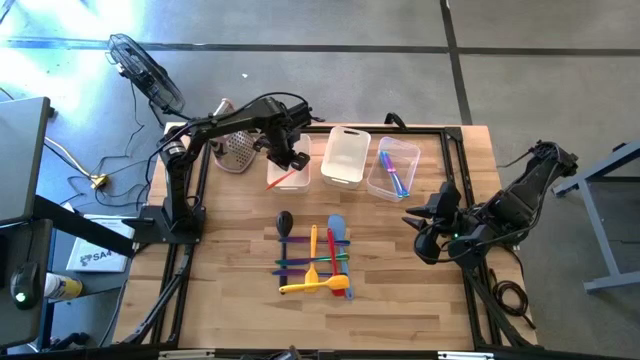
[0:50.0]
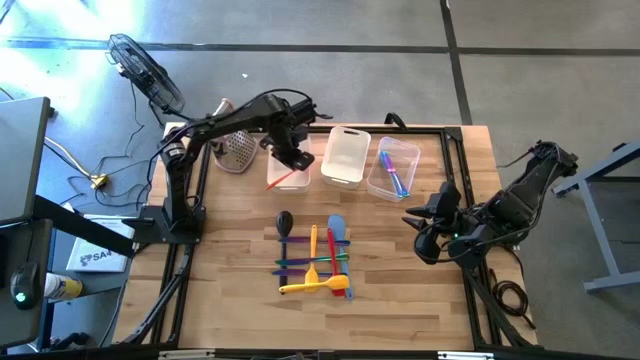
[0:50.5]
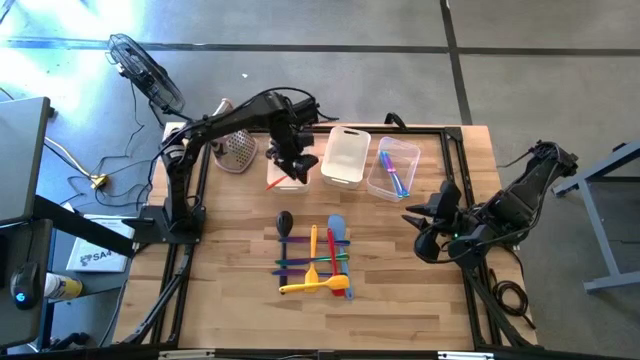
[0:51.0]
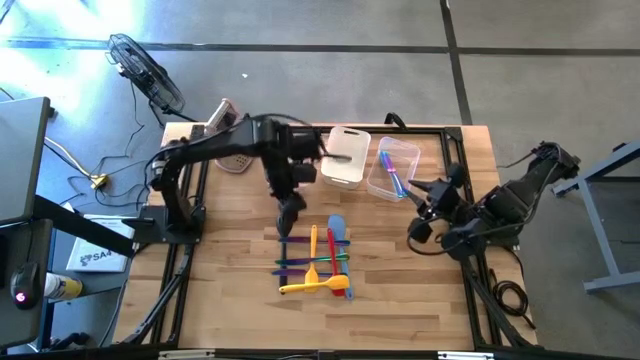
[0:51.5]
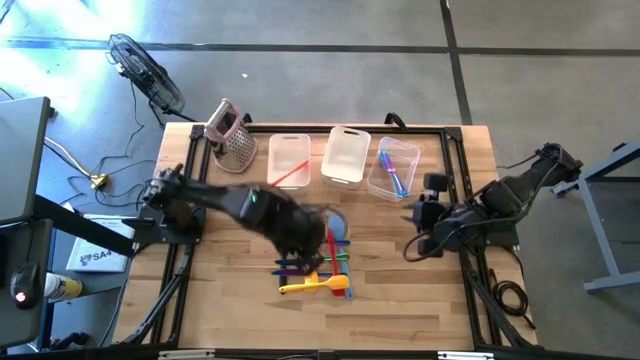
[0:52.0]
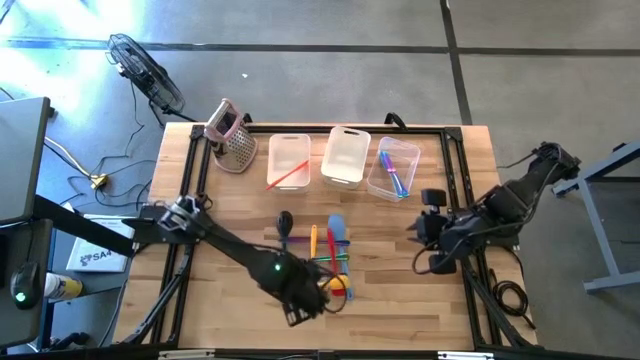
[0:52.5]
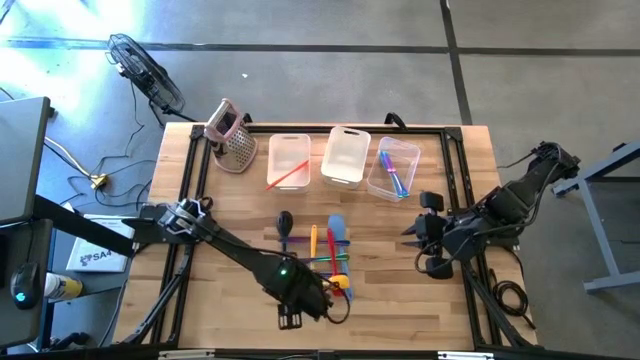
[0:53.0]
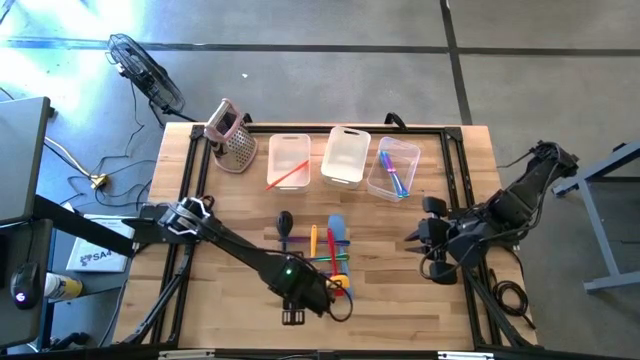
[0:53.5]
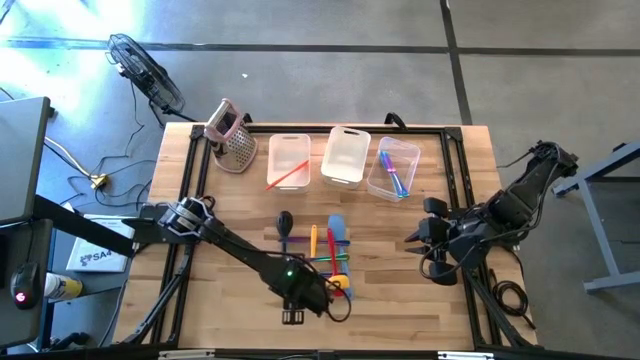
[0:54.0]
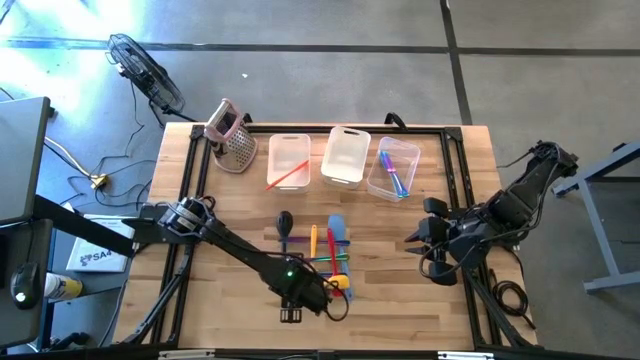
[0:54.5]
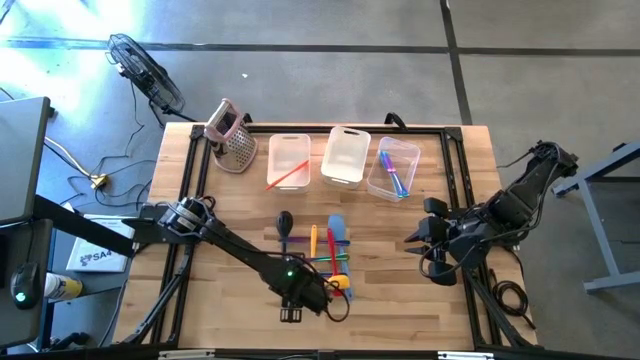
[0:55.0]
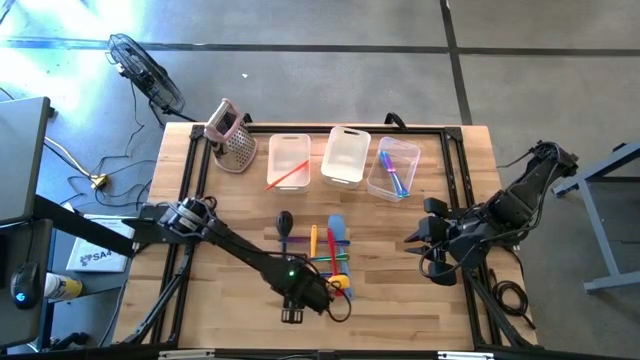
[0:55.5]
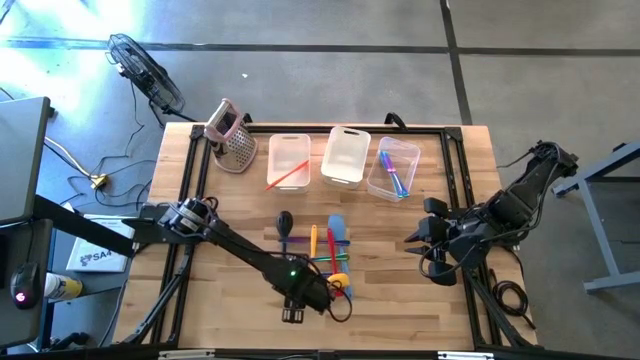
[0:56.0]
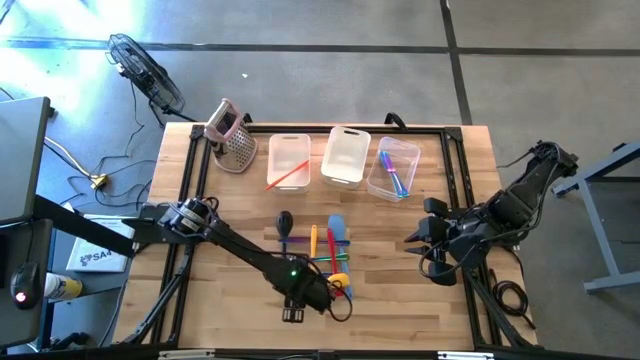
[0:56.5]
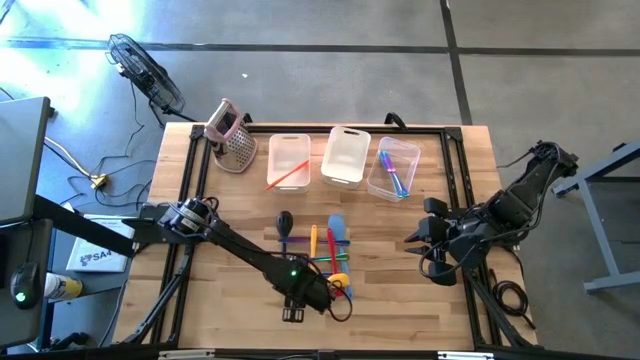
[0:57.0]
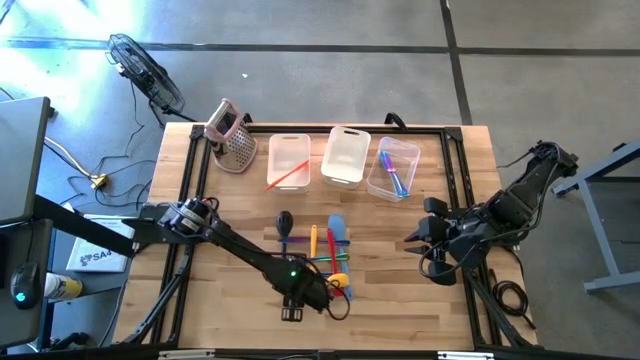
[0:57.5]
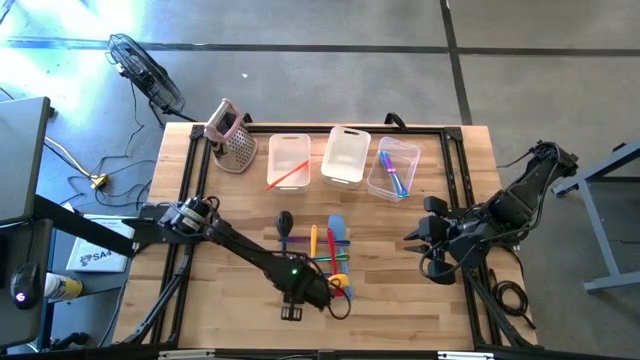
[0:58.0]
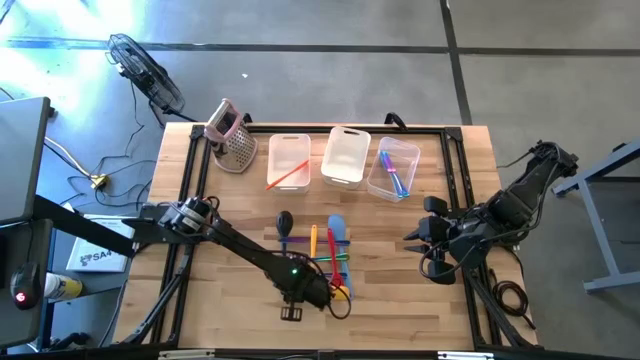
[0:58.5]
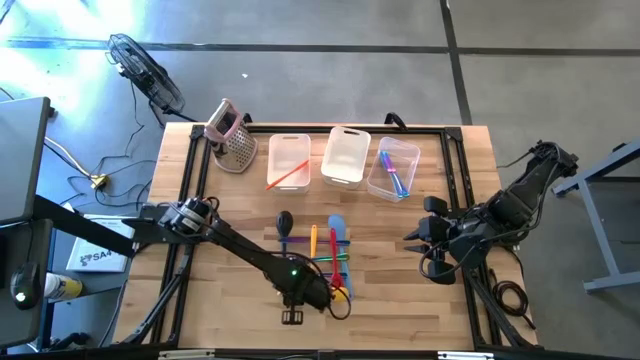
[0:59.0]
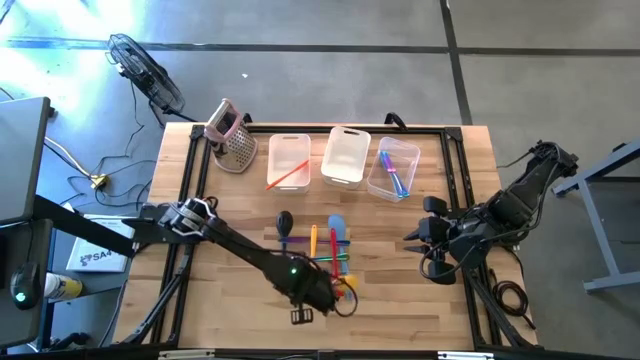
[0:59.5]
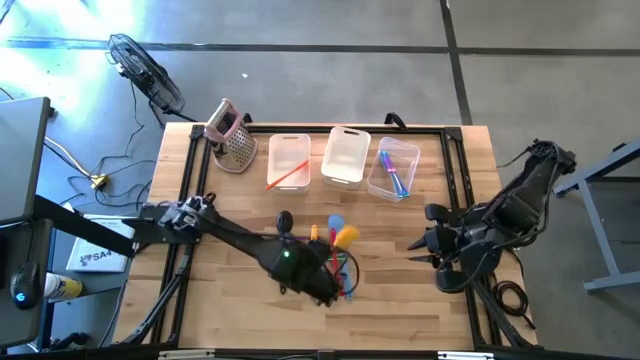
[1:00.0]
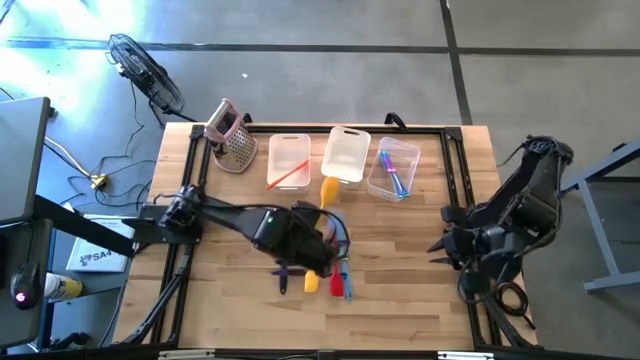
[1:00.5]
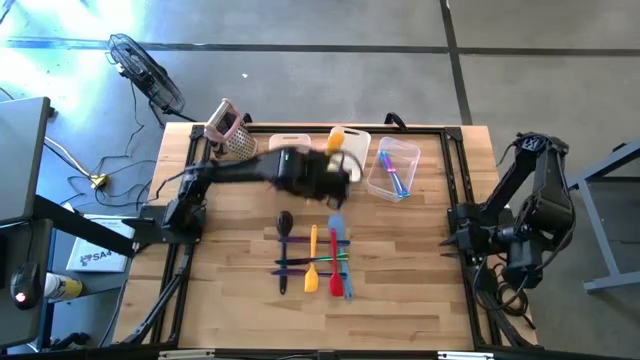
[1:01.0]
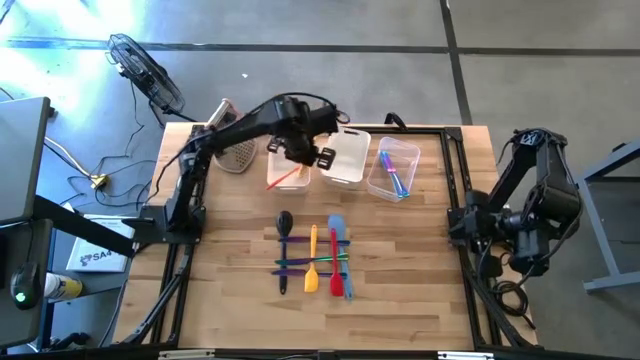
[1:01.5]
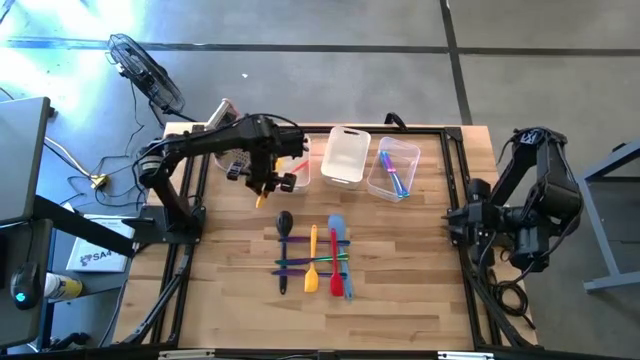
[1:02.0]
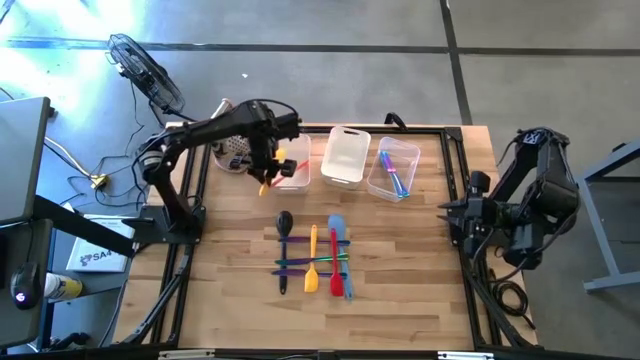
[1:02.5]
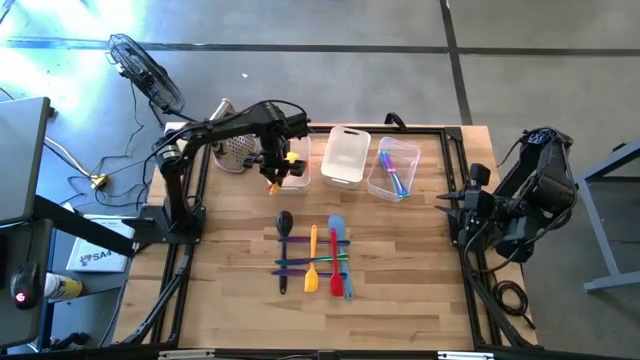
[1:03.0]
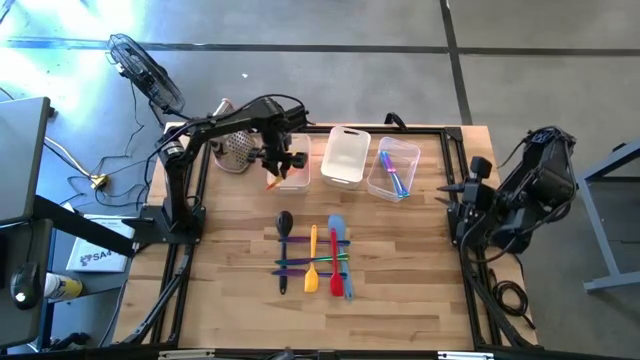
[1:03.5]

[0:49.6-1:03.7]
Task: Pick & Place Kitchen Items
Put the yellow spatula into the left white bin

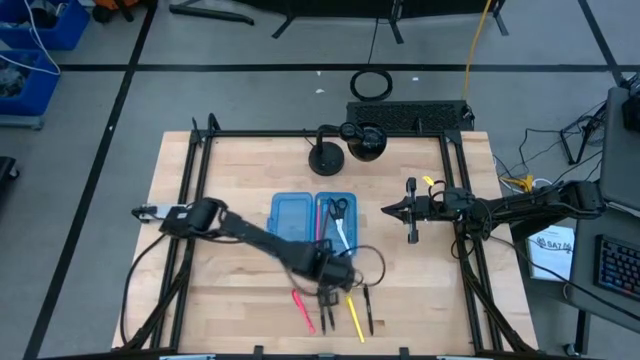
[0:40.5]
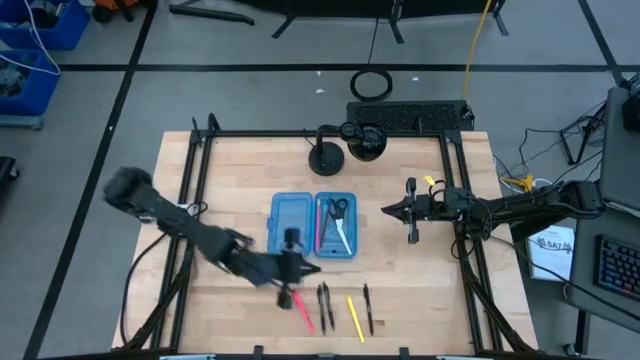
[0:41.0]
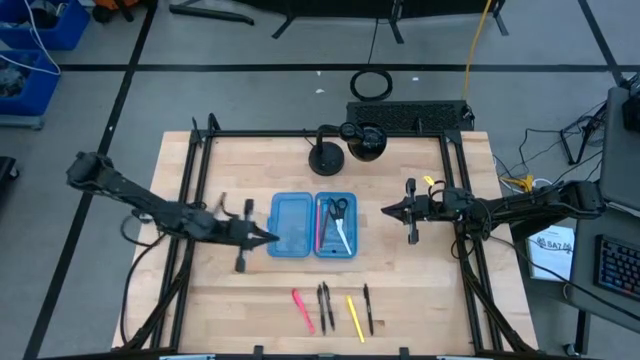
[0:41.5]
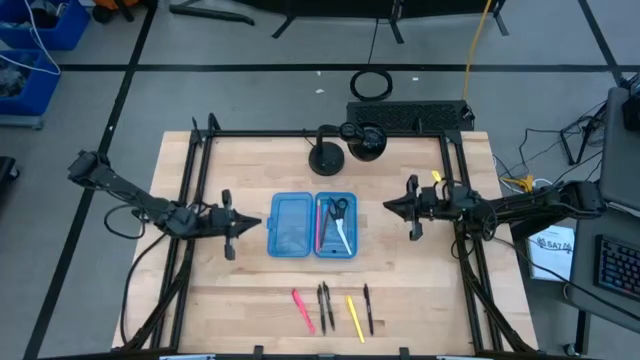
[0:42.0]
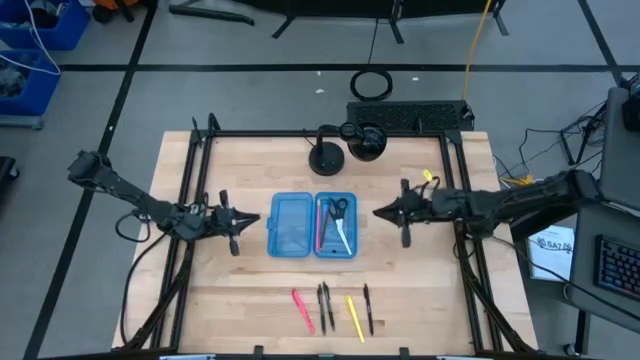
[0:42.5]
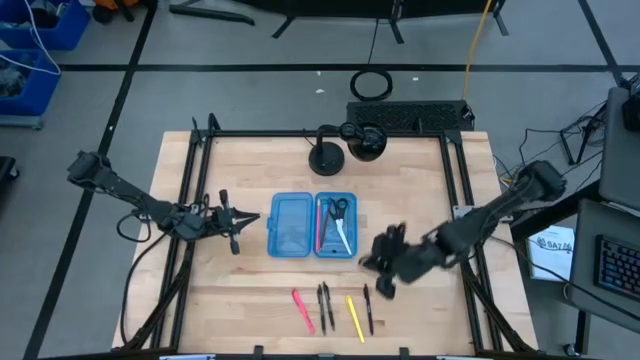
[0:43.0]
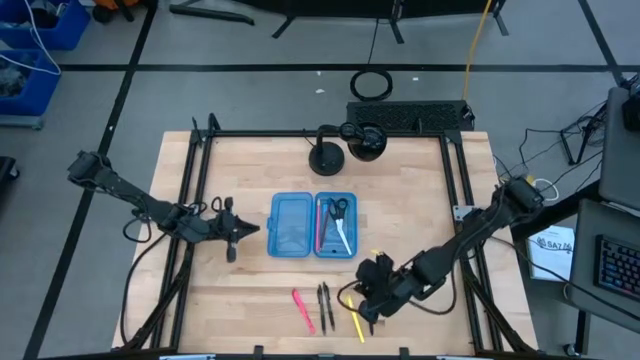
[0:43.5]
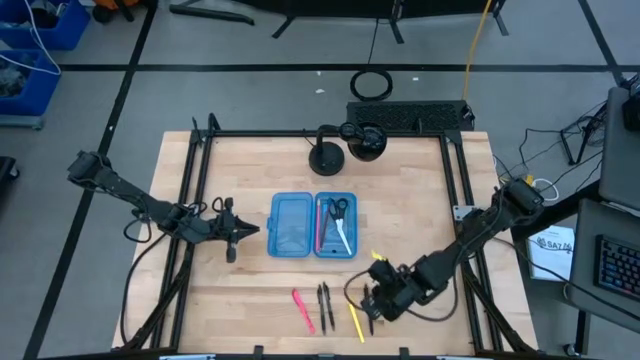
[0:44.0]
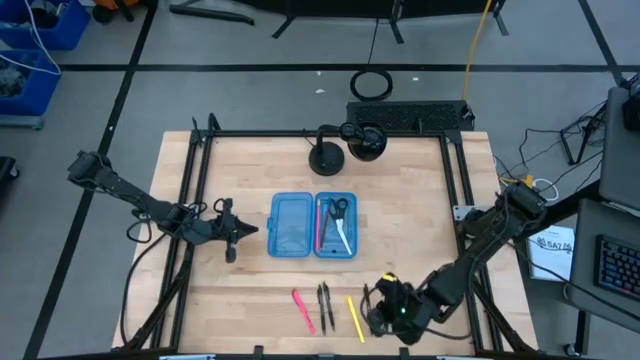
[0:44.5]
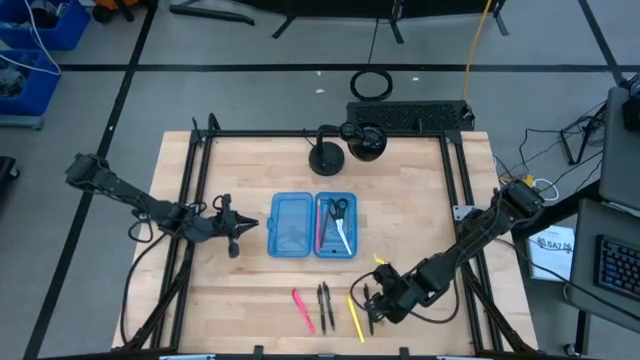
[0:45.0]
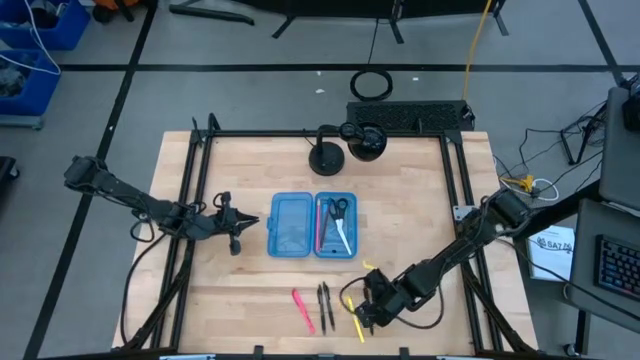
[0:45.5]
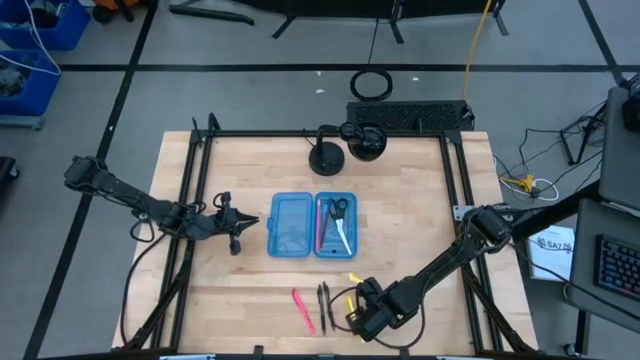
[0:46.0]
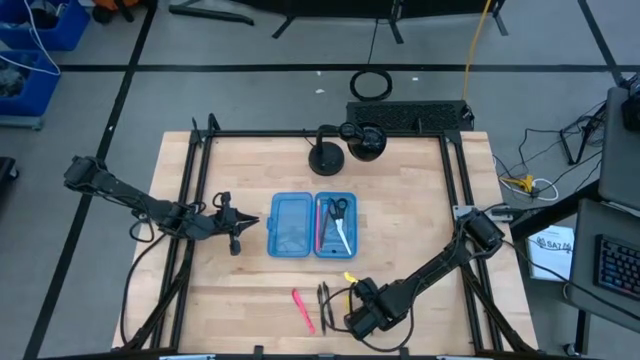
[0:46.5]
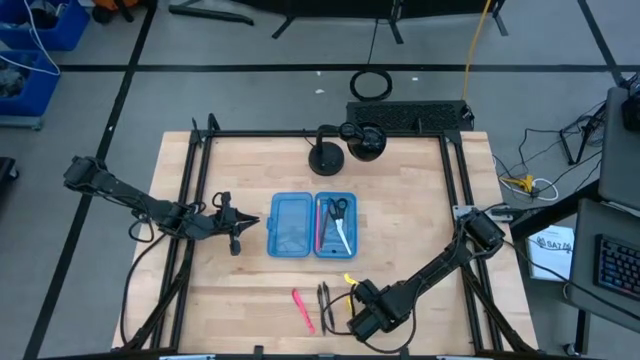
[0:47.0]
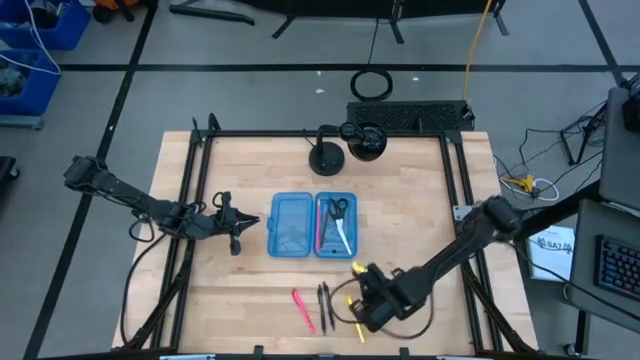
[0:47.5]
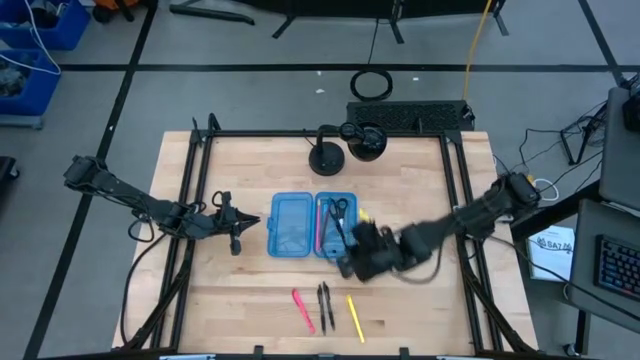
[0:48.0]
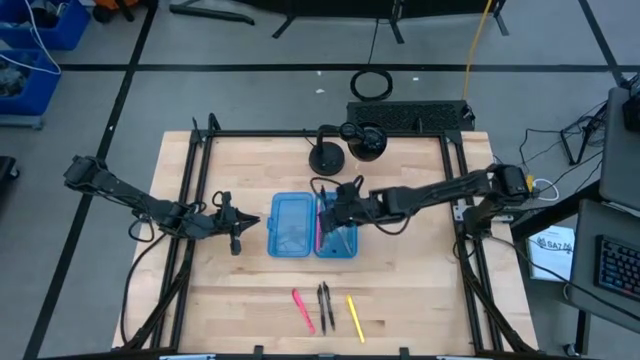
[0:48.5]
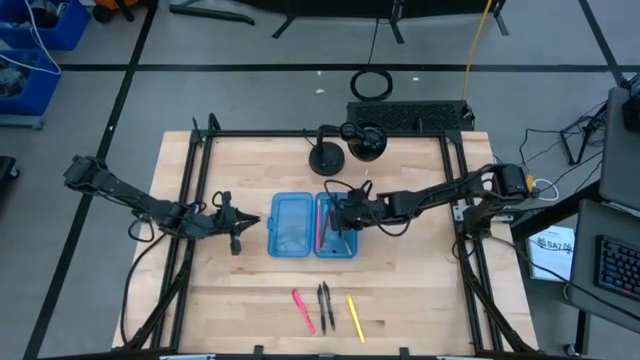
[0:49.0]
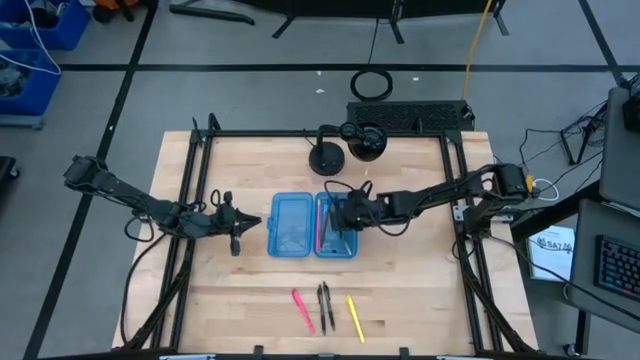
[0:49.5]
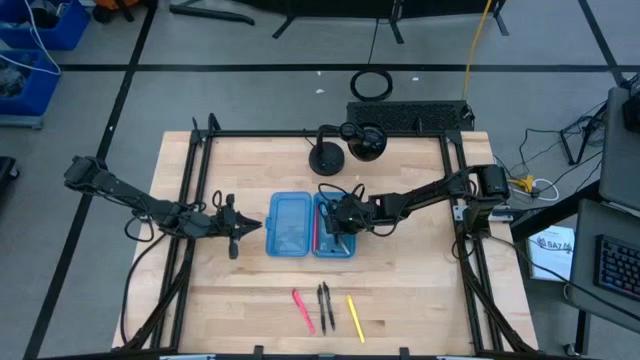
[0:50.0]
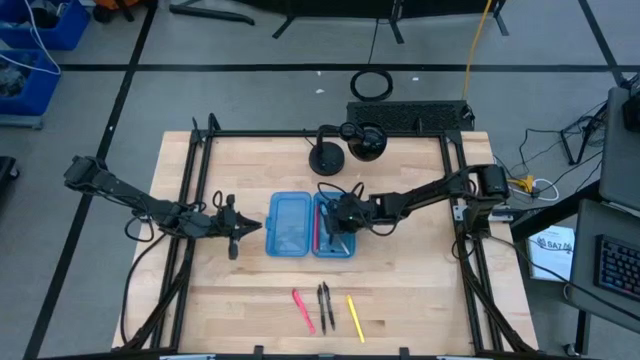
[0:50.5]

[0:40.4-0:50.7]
Task: Pick & place school supplies into a supply box
Put the right black pen into the blue supply box
